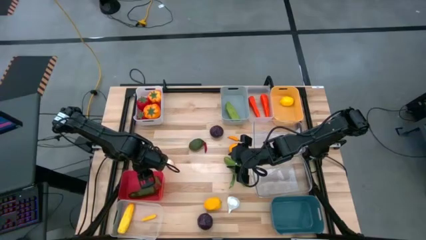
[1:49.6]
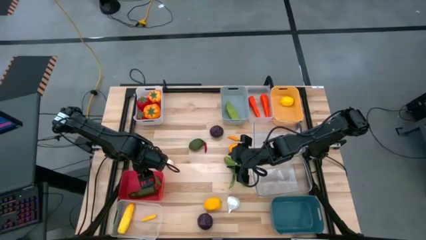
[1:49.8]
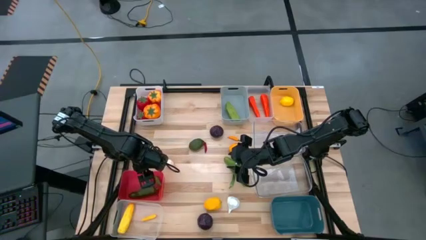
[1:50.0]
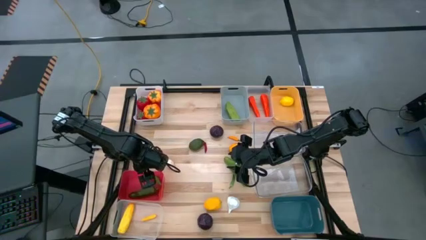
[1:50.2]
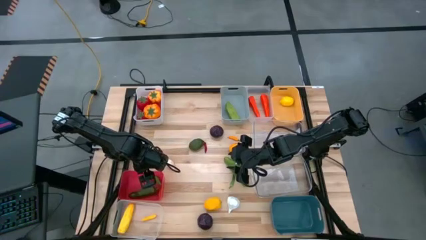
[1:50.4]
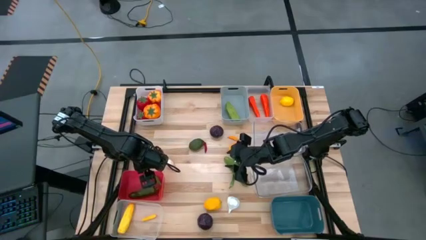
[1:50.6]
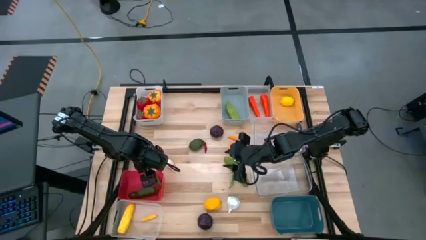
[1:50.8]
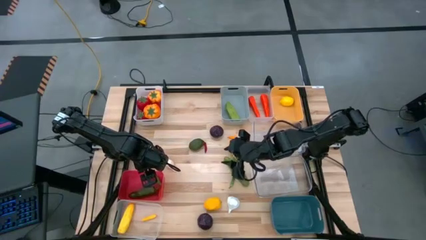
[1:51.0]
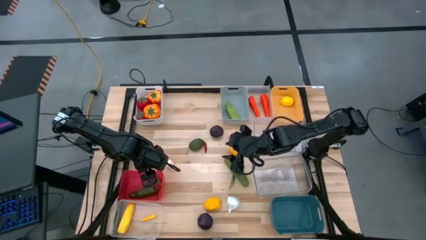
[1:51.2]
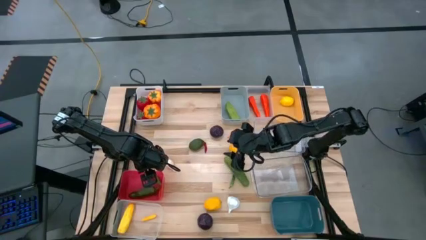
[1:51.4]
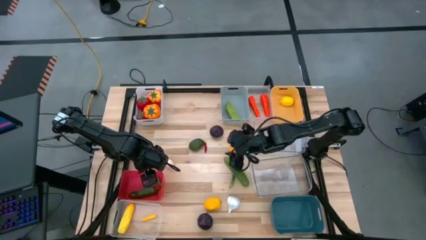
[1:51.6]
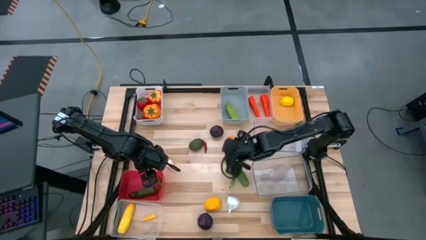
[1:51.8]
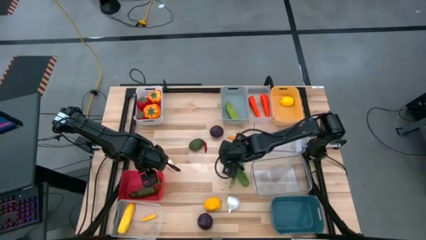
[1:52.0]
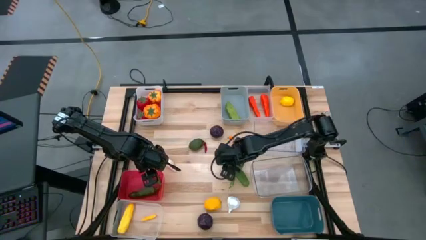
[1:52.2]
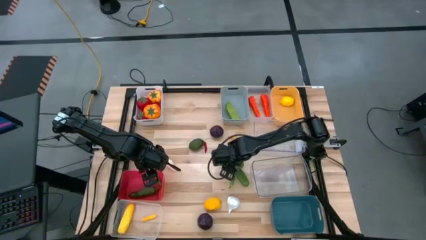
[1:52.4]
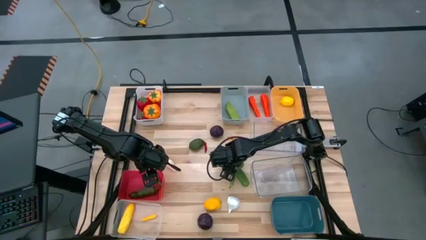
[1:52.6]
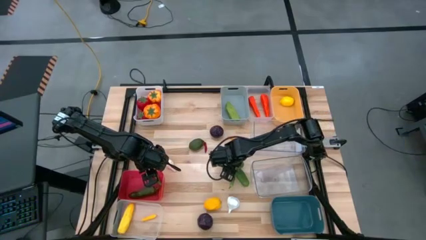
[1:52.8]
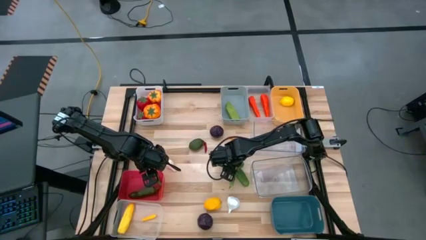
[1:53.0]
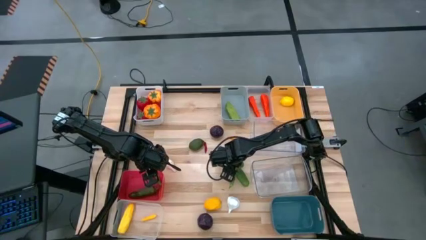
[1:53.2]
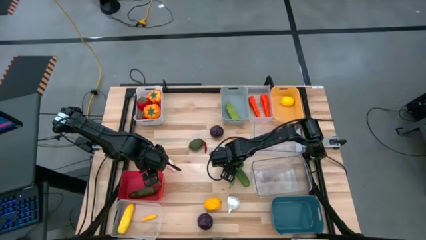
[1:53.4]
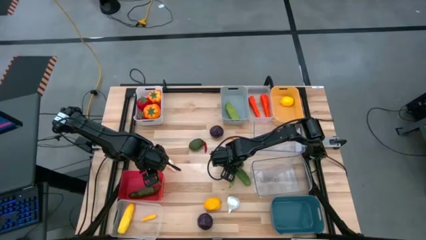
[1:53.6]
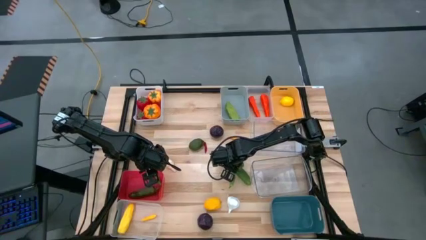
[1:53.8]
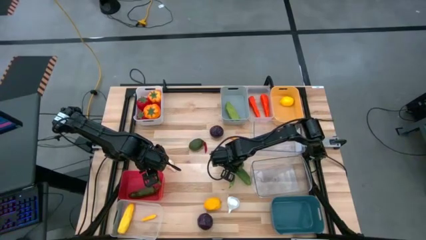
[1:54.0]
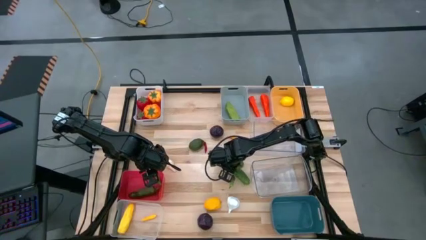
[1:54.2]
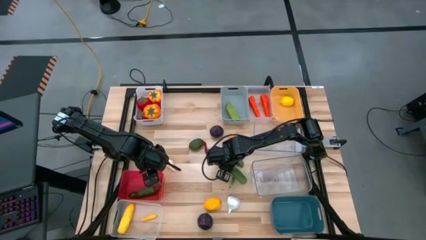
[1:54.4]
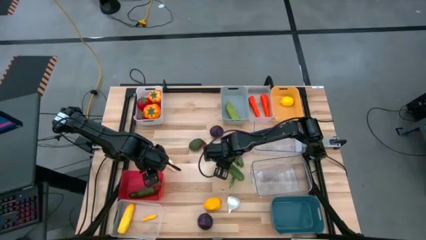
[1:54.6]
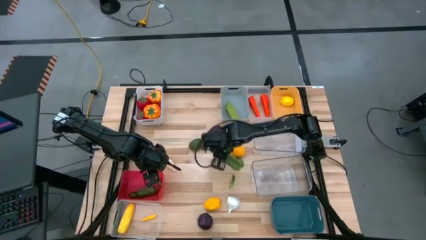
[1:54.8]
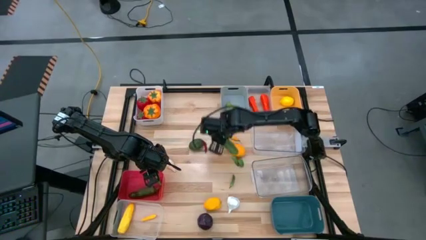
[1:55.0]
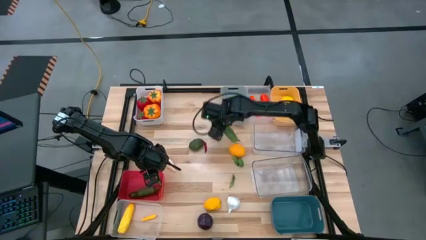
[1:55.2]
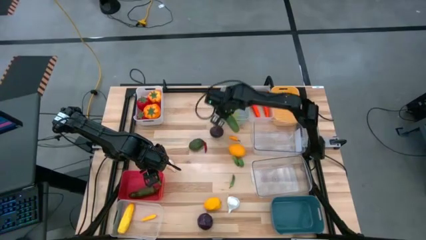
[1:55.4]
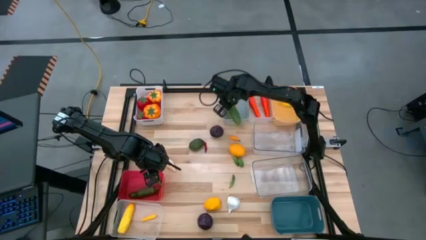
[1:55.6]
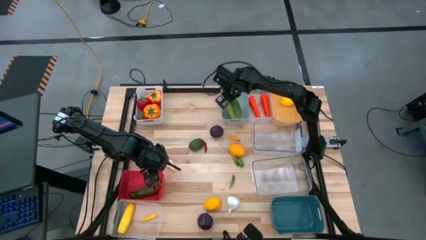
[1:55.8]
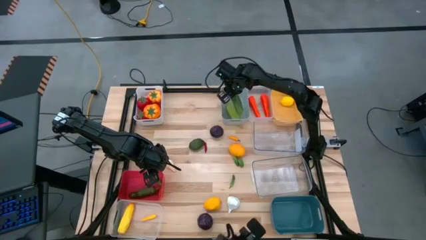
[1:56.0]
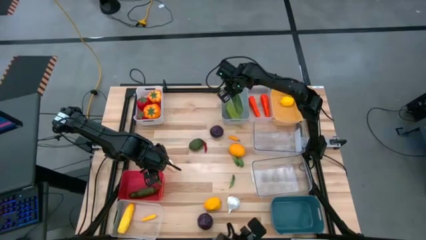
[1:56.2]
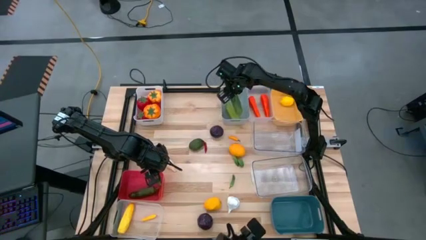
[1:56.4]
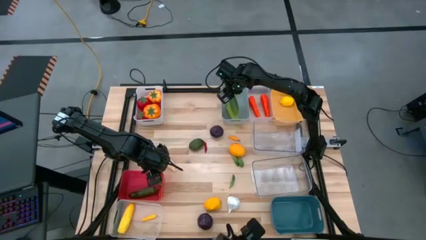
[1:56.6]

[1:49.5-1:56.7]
Task: Sort produce into baskets
Put the cucumber into the gray bin

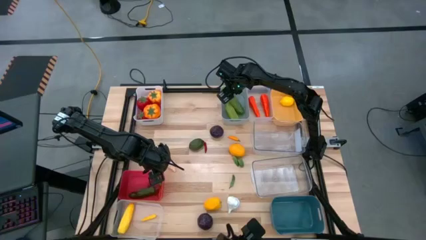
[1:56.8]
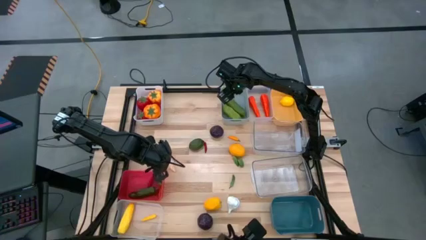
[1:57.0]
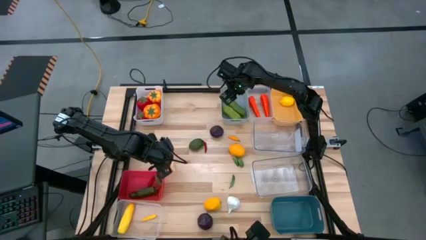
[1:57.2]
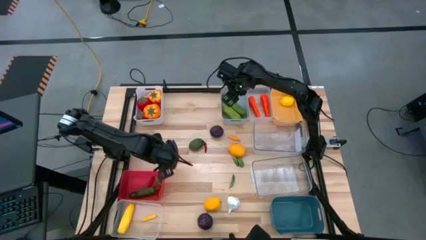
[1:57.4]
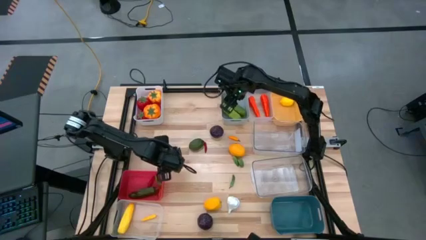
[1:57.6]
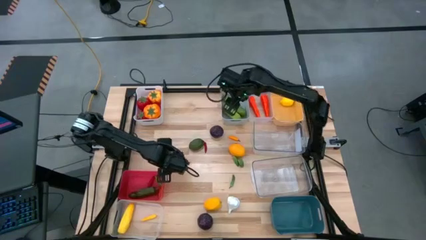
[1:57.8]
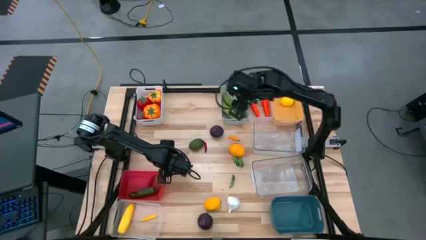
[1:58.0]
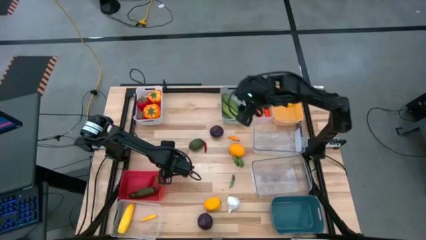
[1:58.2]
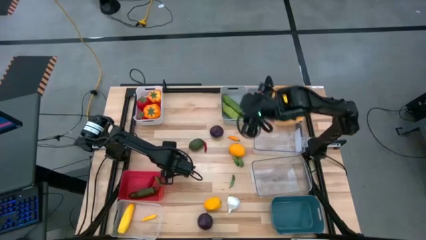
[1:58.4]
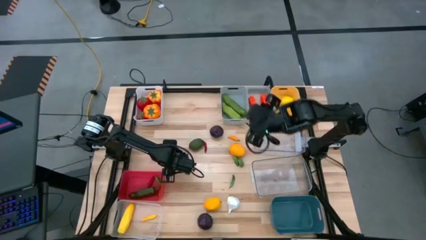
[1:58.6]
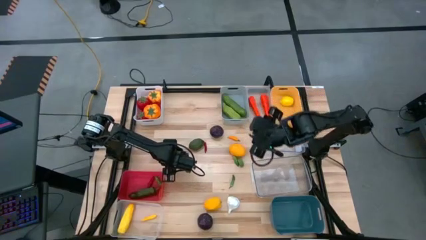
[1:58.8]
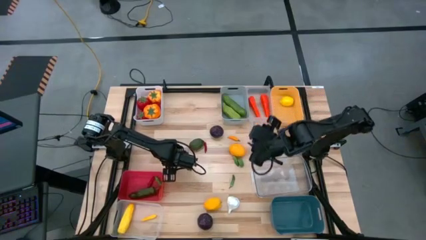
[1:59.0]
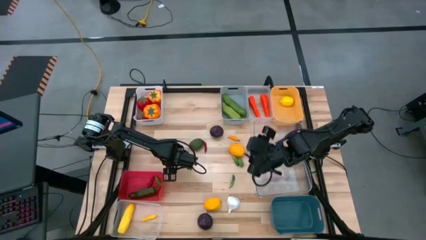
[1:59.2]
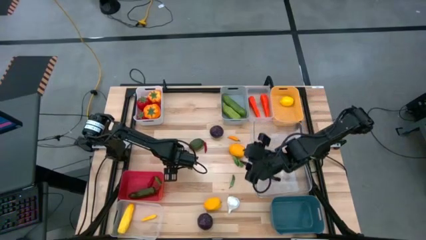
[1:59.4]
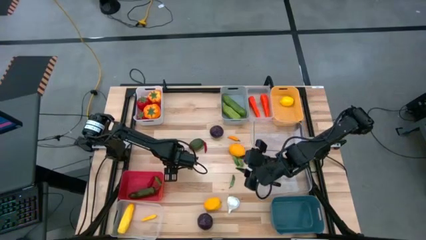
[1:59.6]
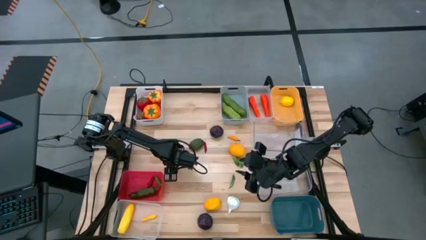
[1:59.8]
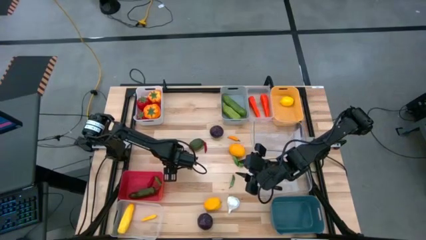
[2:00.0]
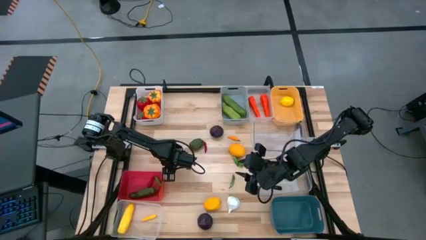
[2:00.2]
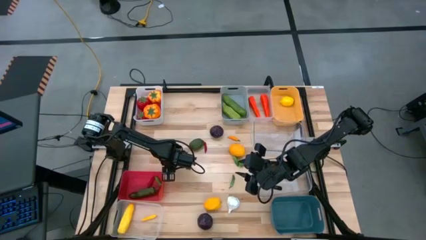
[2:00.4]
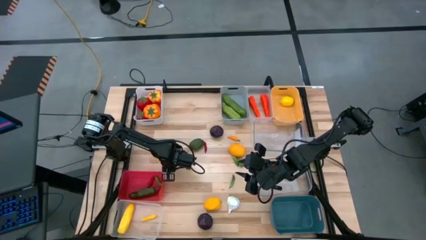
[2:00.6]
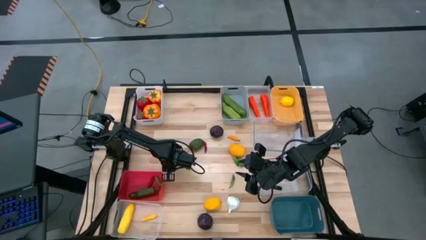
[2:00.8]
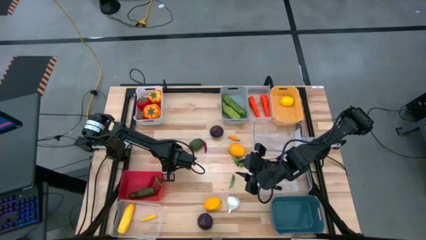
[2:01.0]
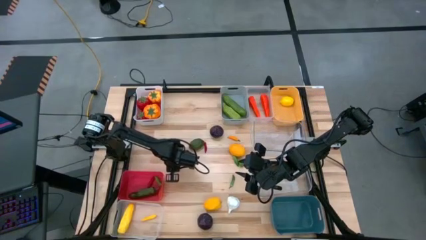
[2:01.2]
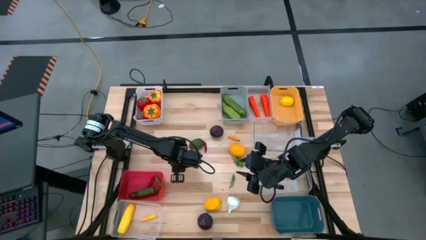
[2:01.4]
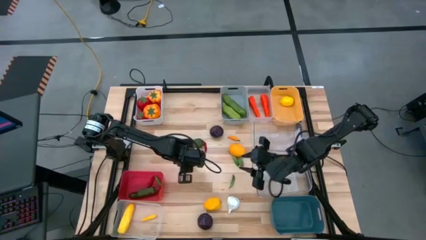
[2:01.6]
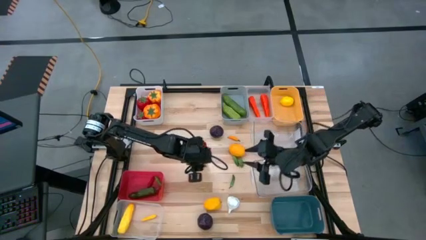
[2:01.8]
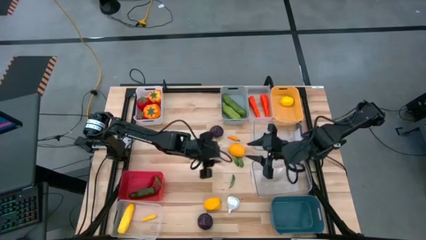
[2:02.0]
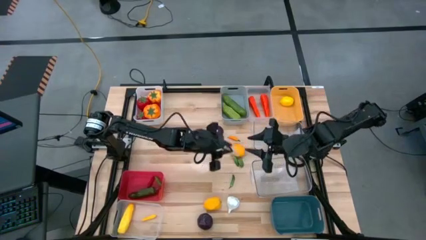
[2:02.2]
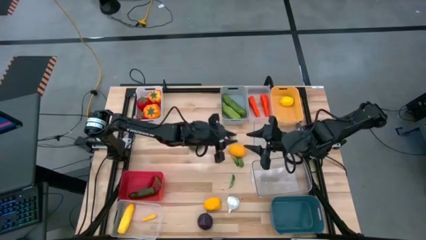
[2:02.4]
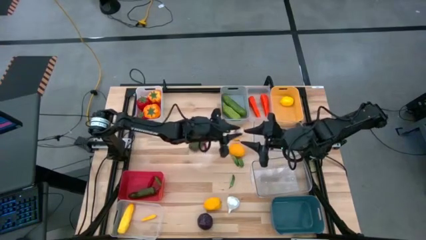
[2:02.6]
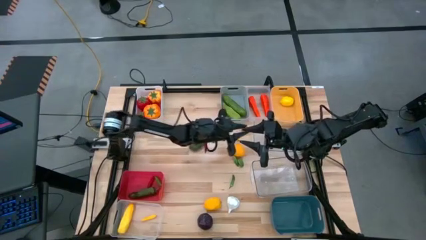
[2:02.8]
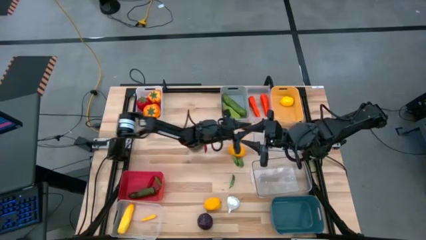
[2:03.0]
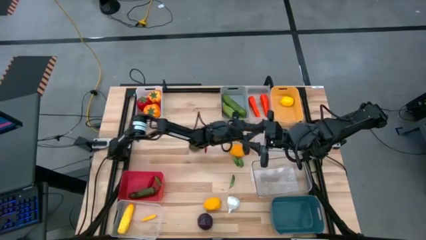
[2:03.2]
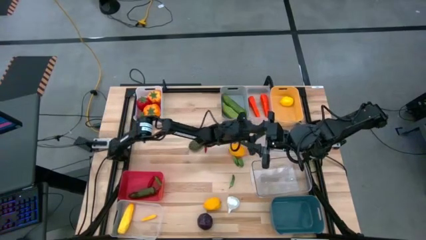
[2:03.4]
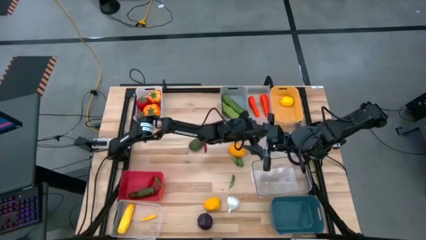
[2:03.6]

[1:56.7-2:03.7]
Put the left garlic into the top transparent bin

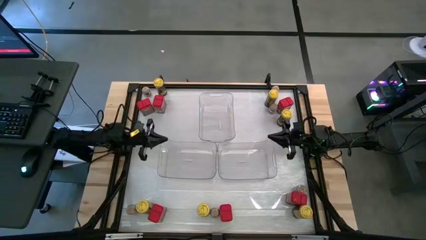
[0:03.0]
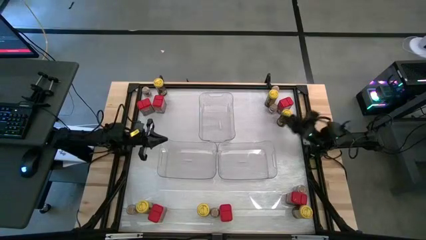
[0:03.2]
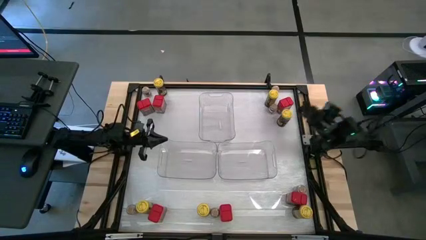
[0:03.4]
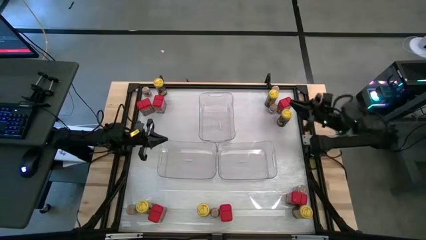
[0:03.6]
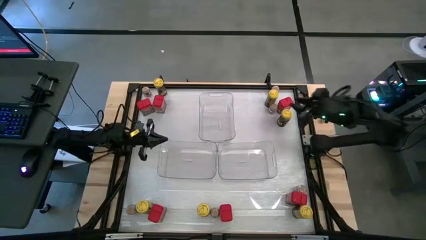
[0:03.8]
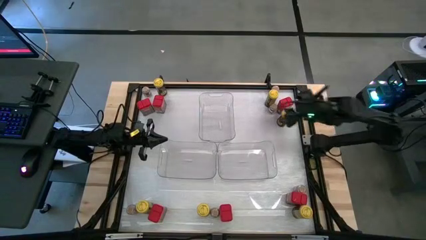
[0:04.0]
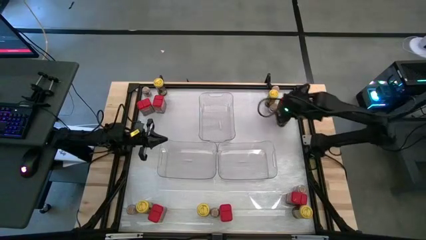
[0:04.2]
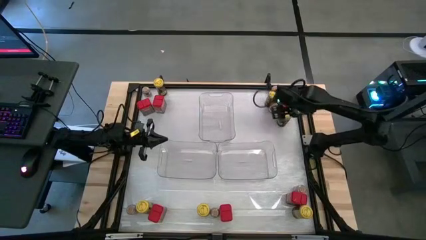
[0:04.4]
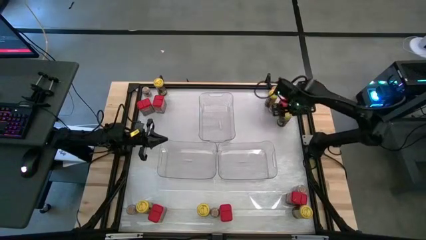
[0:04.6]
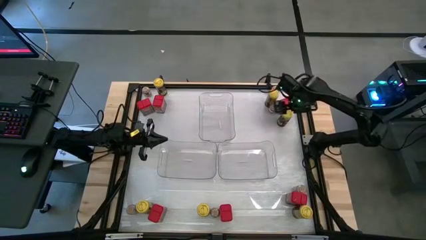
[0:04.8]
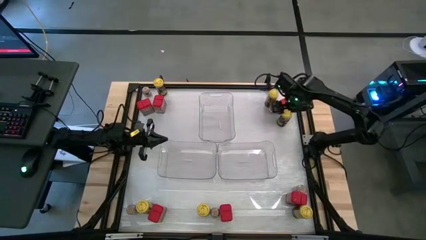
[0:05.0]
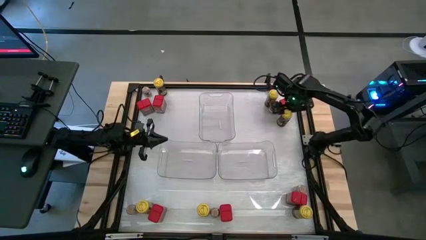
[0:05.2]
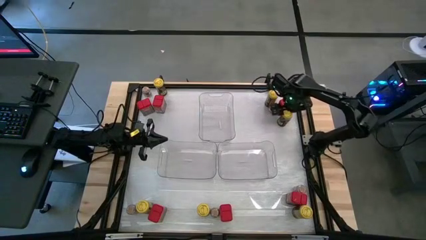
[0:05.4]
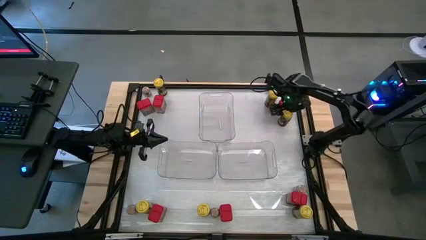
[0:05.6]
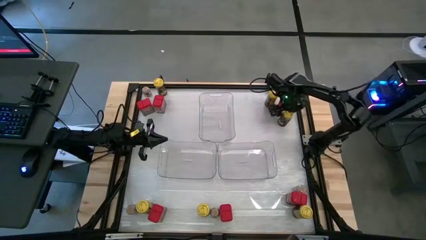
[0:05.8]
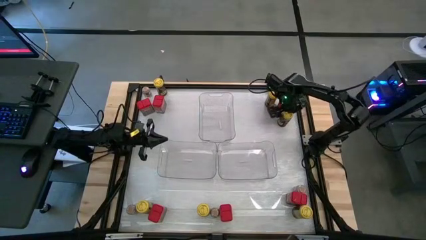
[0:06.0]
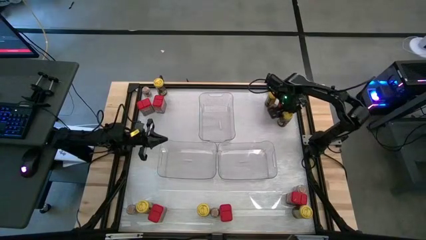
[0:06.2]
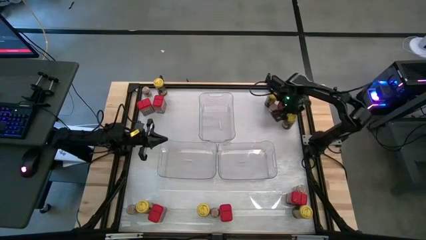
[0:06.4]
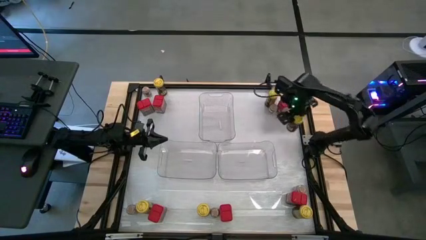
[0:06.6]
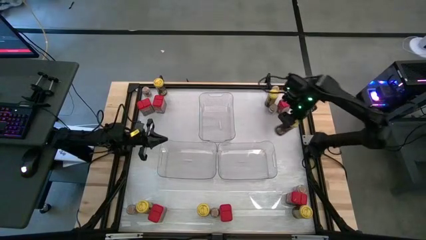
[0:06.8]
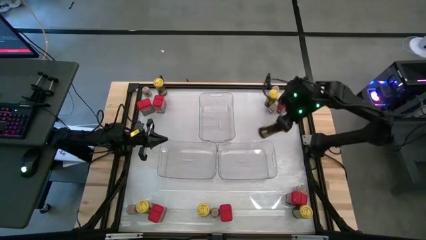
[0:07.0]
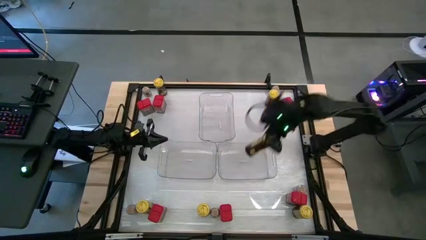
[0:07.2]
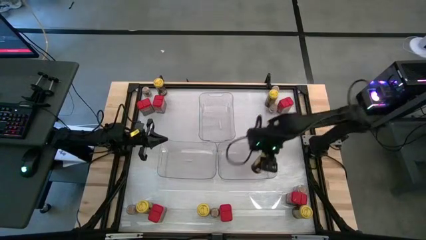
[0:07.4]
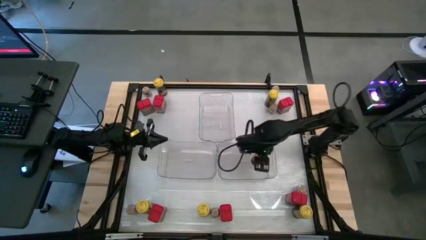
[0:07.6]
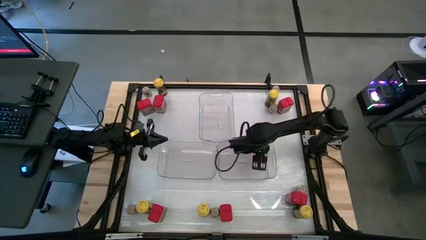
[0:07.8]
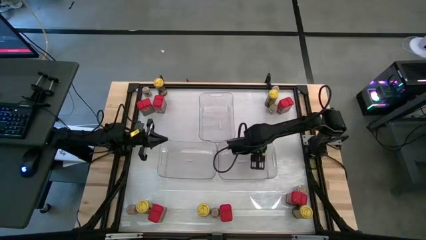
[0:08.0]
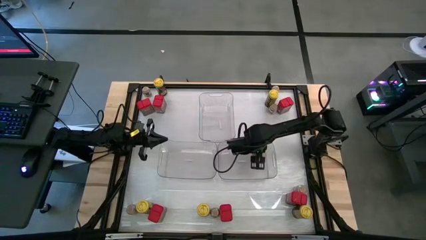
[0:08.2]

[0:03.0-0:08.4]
Task: Sort spices by type
Put the yellow seasoning bottle into the bottom right transparent bin
